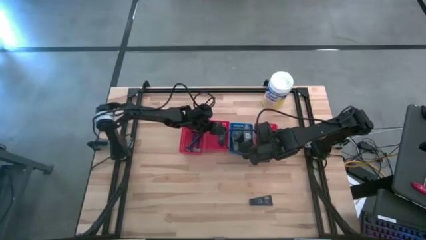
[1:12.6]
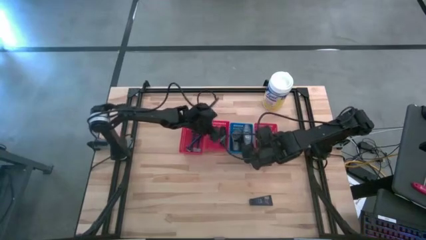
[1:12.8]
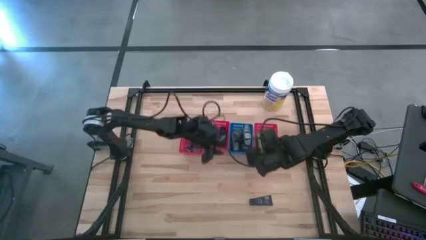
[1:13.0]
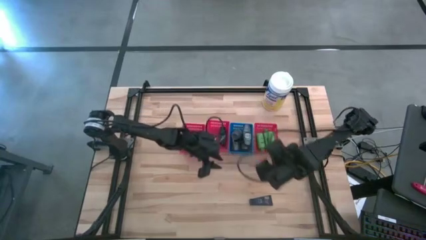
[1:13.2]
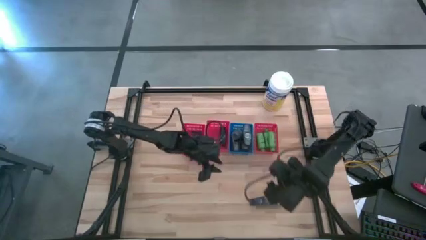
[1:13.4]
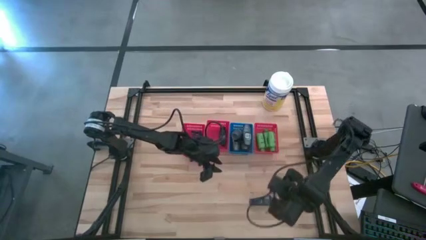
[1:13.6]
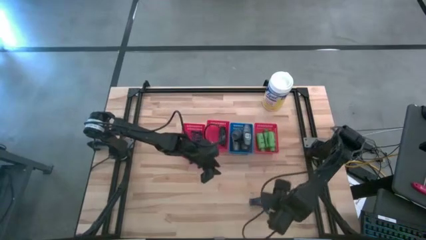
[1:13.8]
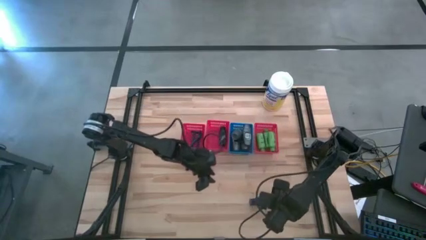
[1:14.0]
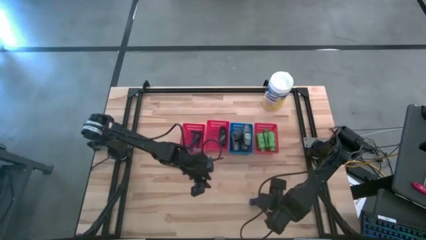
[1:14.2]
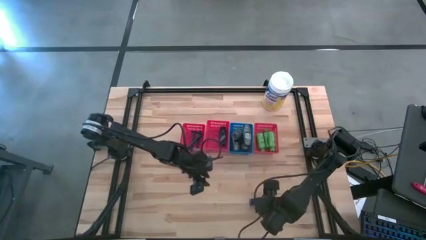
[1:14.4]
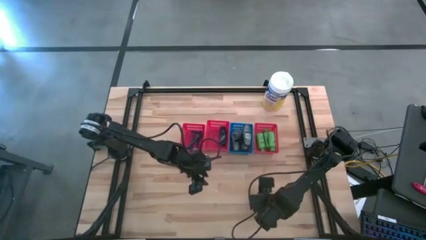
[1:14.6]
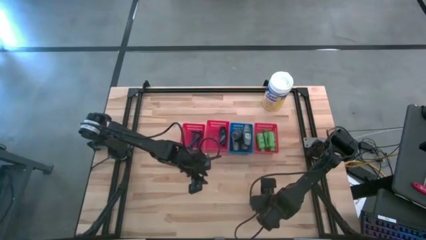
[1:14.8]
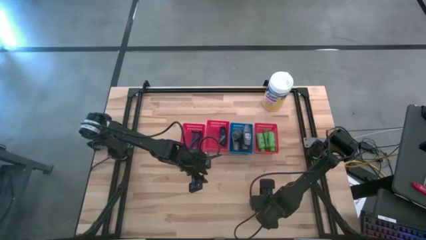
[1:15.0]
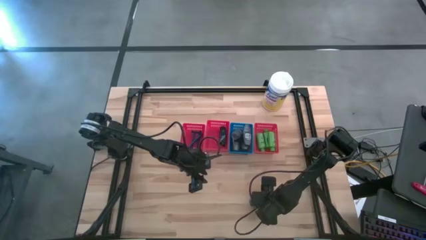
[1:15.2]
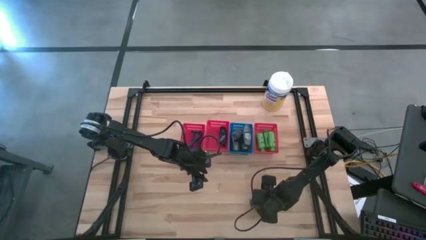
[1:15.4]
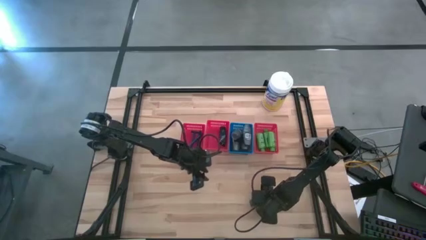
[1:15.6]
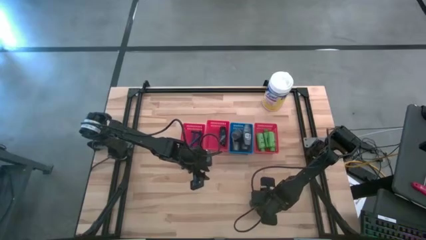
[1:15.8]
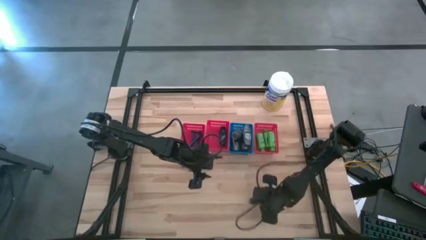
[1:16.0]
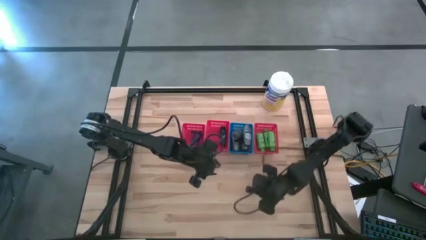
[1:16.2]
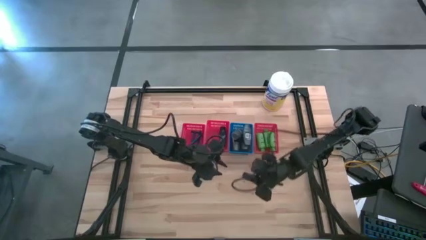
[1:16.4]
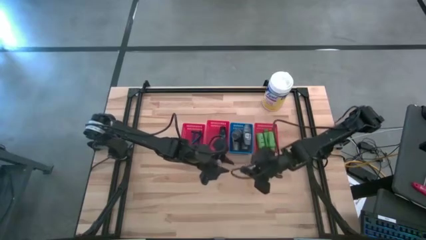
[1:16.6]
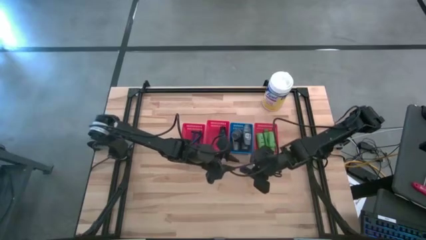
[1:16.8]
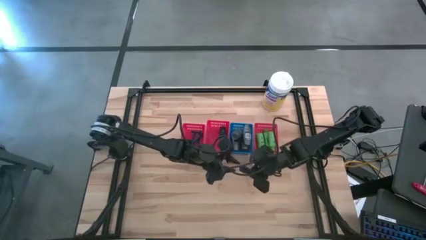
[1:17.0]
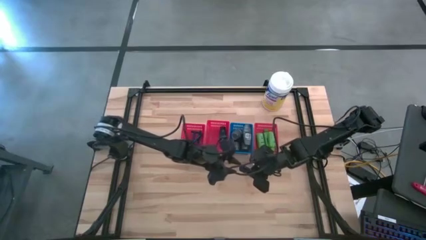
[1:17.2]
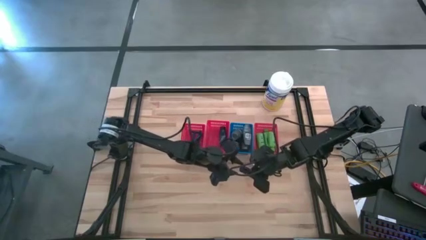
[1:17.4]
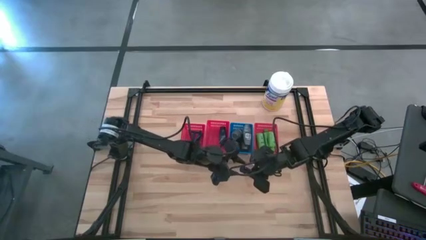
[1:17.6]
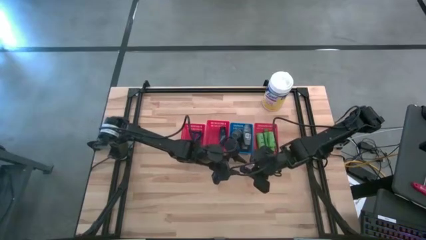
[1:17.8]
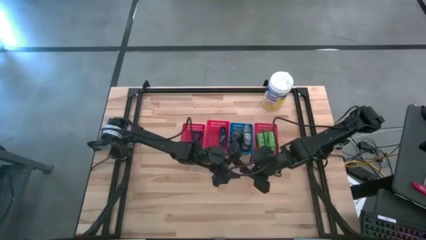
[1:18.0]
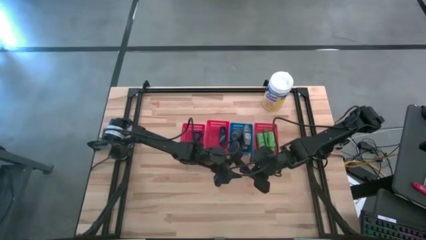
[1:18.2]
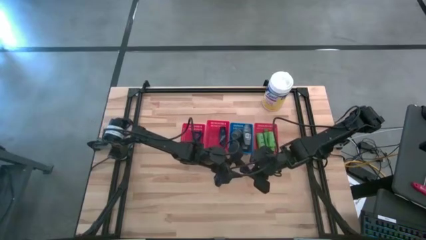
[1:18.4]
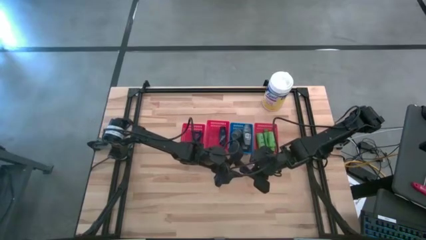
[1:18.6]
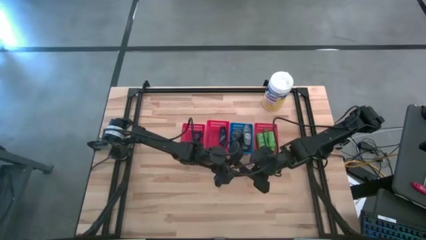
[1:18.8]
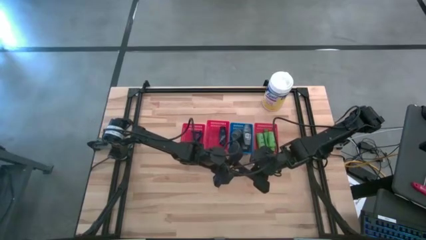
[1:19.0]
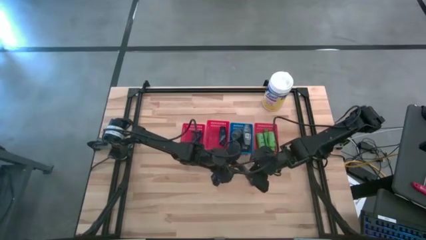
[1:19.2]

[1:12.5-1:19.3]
Task: Pick & Place Travel size toiletries
Put the blue shave cream into the middle red bin

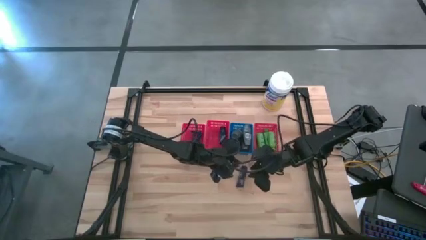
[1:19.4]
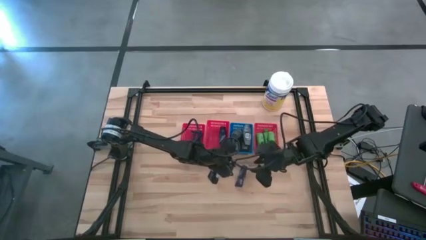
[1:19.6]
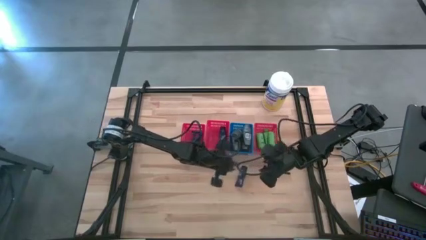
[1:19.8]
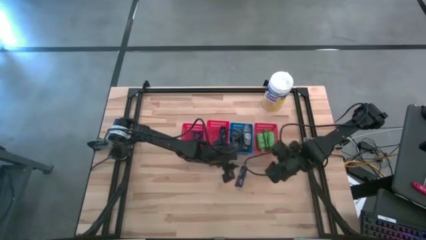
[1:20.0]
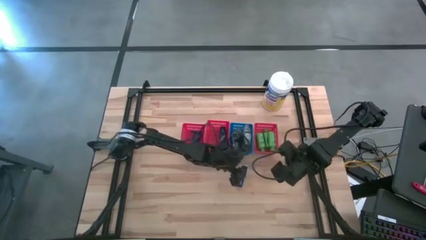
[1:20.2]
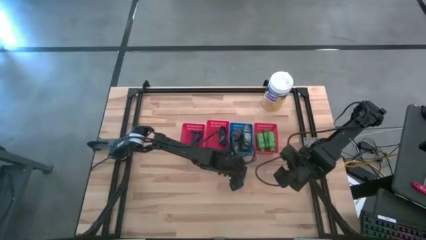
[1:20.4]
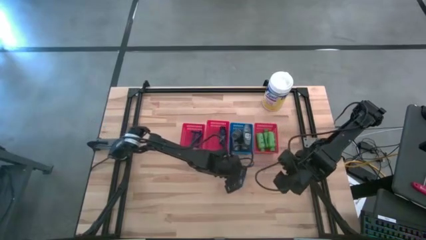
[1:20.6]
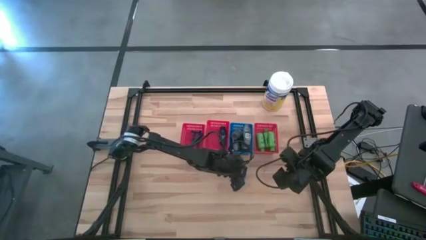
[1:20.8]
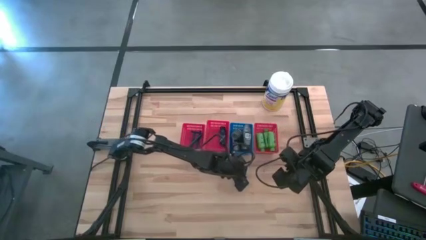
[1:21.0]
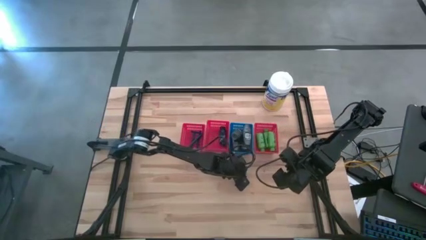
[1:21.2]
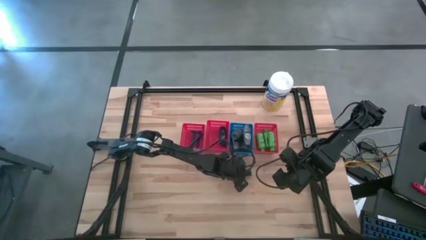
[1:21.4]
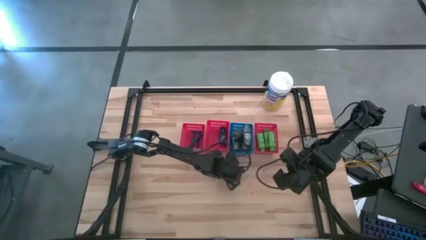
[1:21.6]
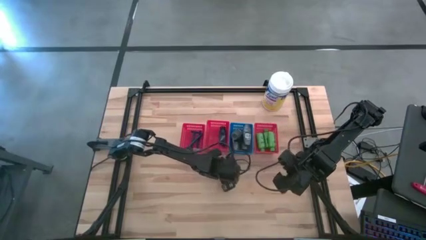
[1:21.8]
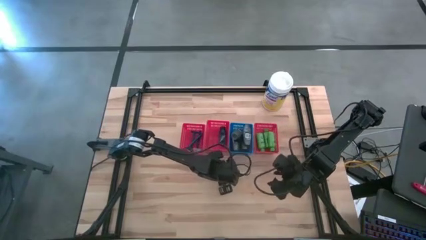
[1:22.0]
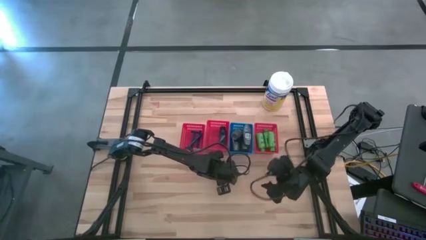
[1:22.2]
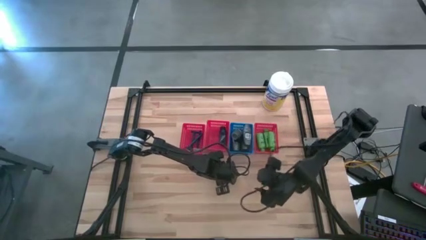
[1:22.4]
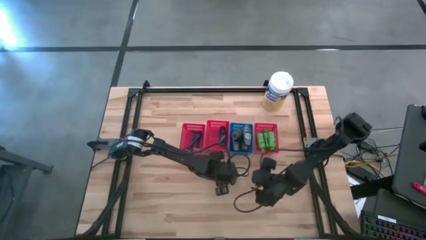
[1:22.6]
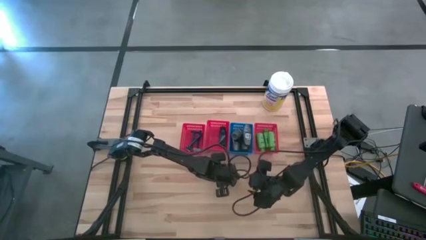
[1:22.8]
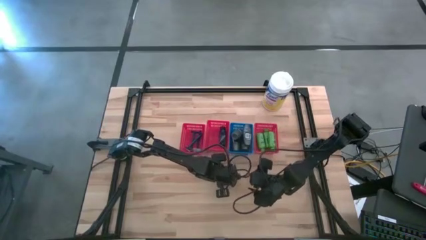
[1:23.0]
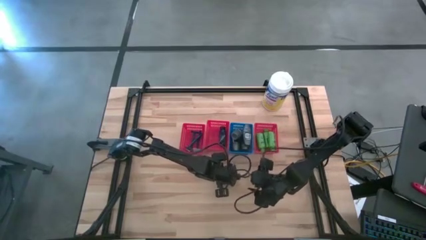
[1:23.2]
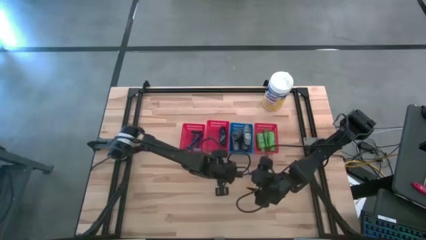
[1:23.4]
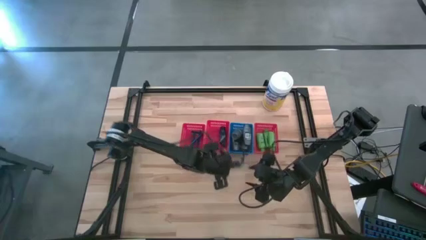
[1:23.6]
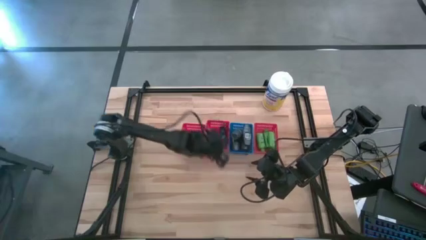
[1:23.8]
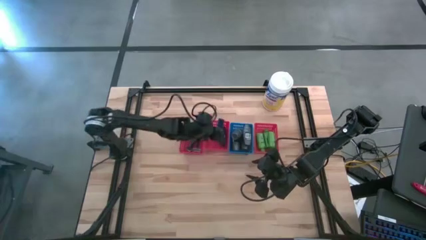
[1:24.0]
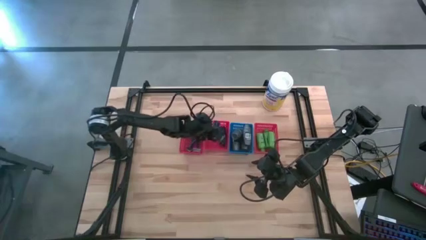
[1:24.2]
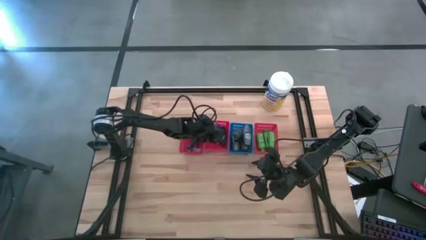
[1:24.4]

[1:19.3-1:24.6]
Put the blue shave cream into the middle red bin

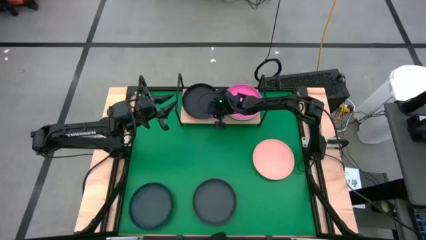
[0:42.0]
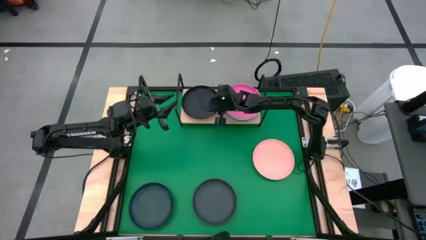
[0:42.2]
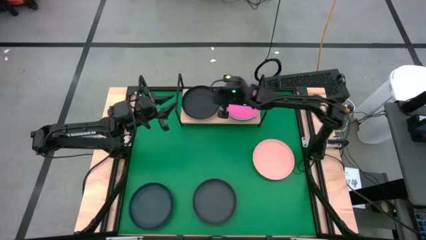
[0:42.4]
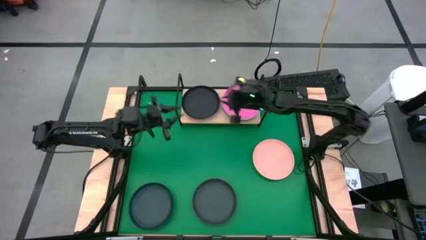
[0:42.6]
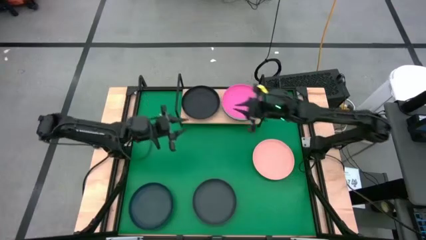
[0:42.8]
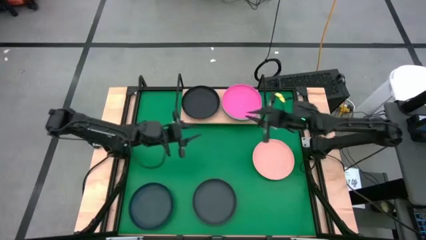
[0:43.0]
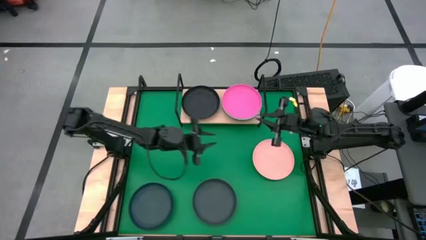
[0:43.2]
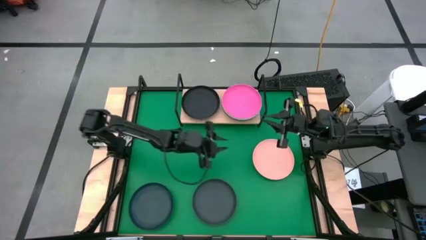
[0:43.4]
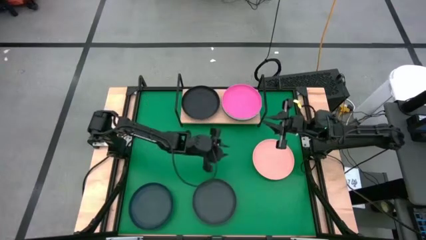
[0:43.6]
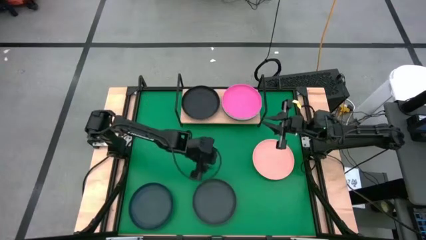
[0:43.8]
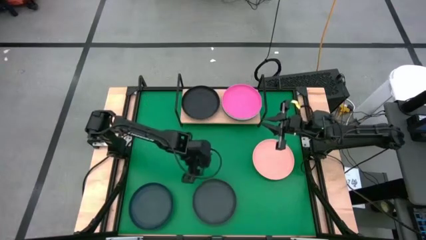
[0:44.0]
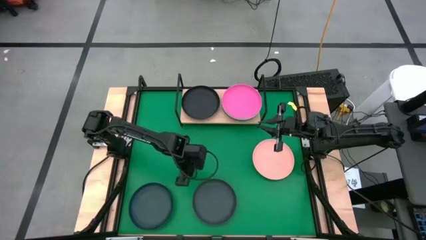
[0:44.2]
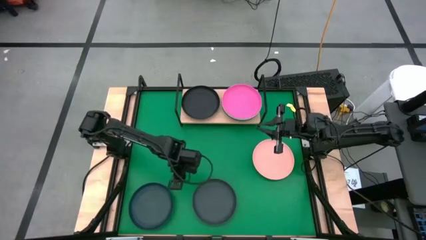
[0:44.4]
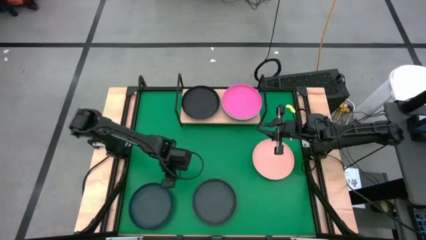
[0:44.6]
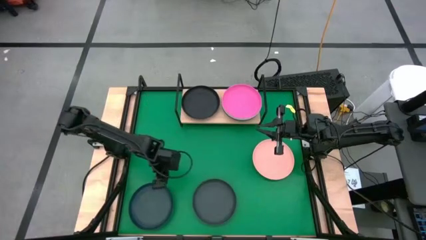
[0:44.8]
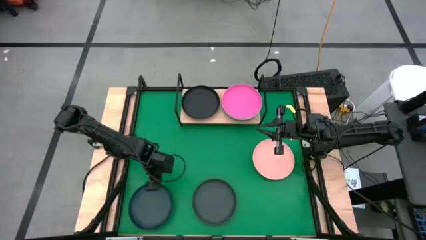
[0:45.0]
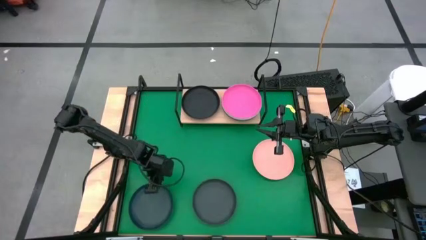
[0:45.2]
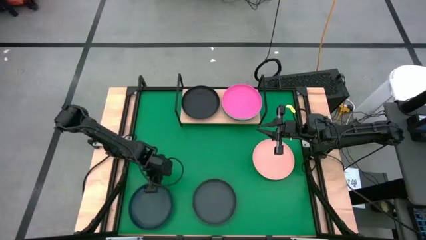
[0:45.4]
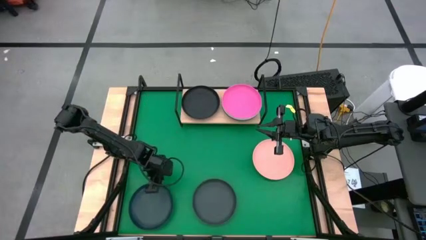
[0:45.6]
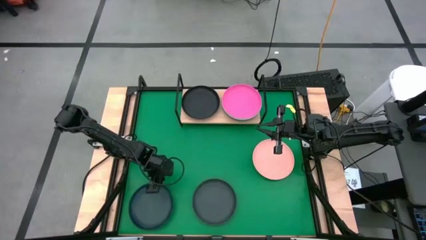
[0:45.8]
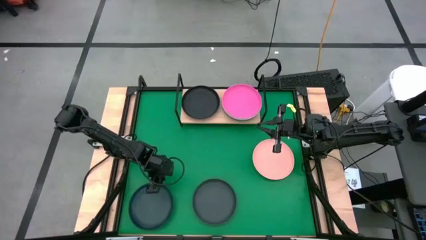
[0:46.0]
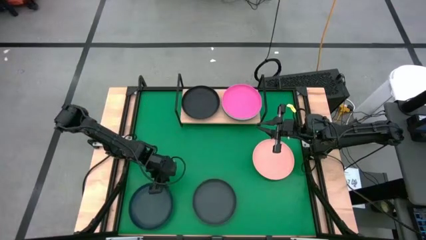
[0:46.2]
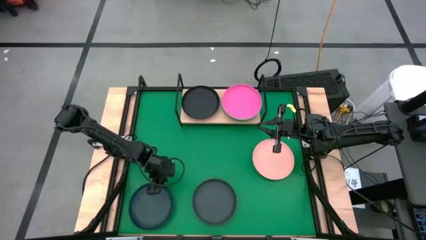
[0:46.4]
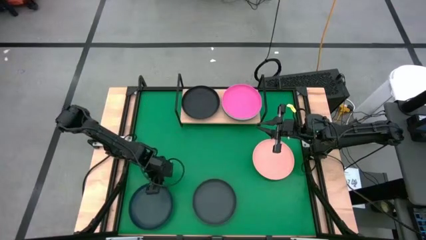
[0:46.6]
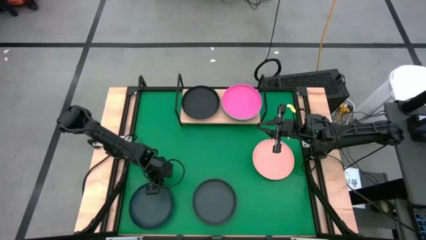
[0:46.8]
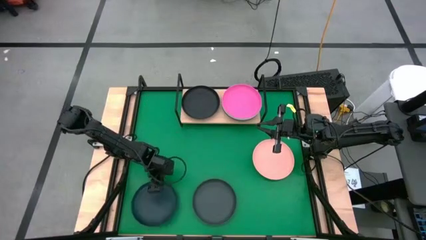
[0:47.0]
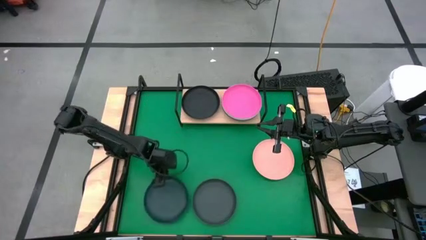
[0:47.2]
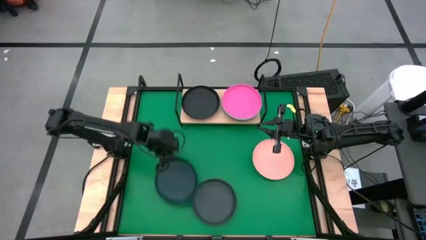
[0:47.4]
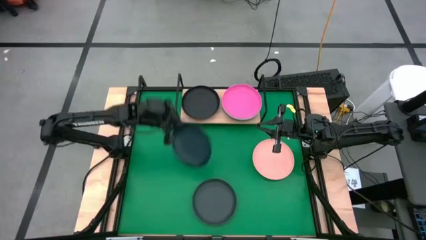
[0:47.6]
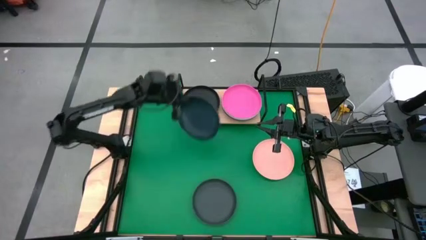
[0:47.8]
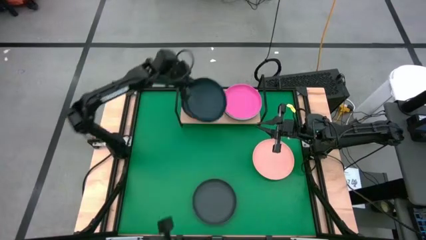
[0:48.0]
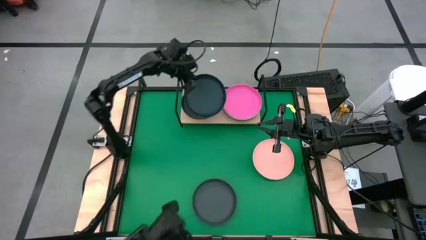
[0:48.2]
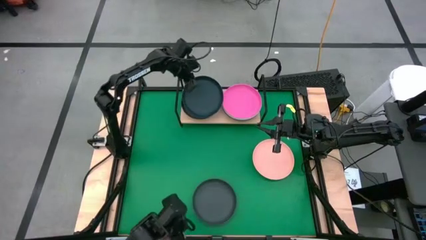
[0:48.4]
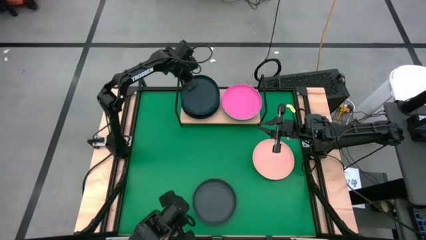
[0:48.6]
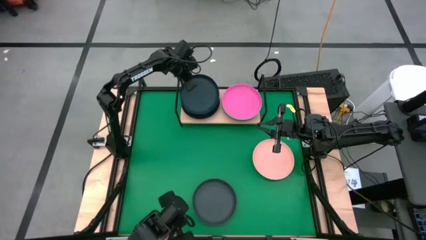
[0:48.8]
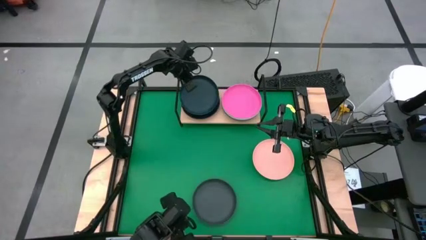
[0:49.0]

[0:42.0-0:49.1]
Task: Place and stack plates onto a shelf
Stack the dark blue plate on top of the black plate on the shelf
